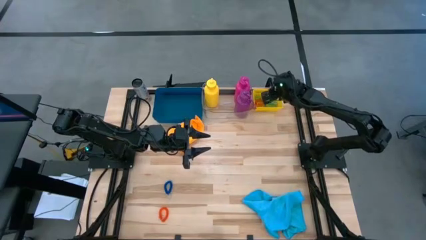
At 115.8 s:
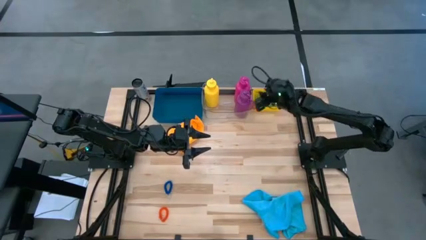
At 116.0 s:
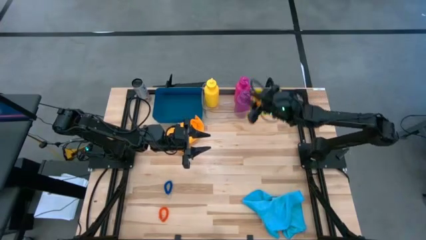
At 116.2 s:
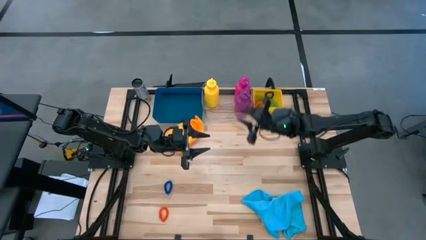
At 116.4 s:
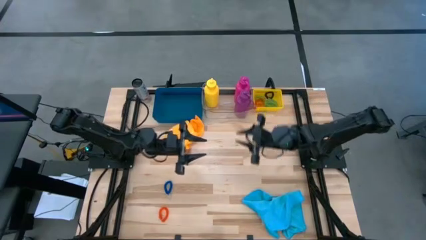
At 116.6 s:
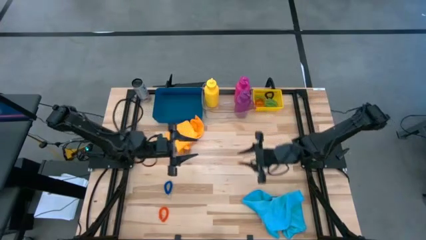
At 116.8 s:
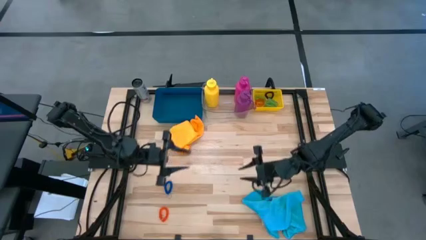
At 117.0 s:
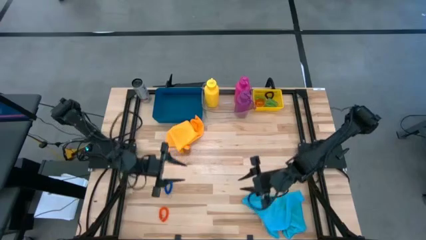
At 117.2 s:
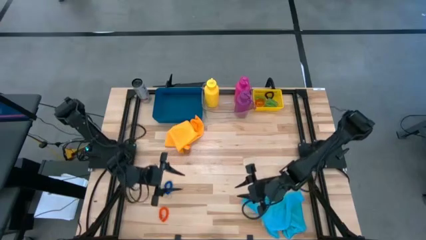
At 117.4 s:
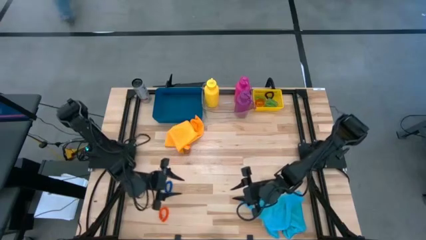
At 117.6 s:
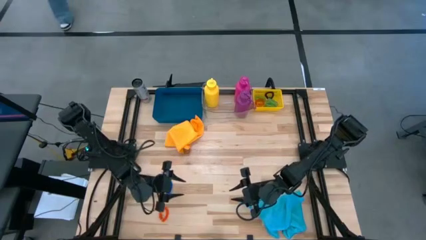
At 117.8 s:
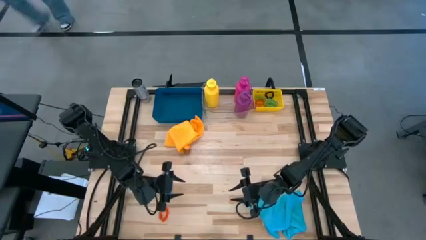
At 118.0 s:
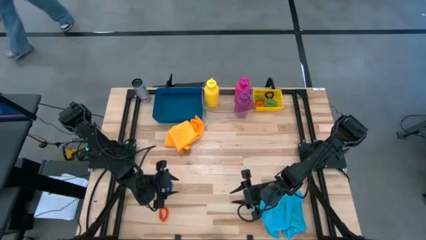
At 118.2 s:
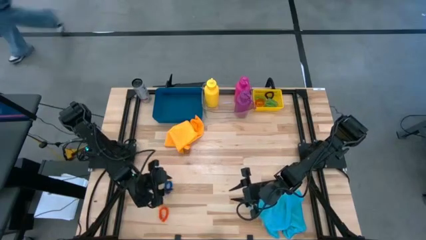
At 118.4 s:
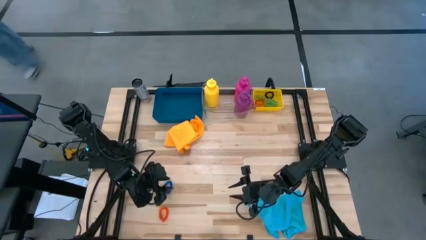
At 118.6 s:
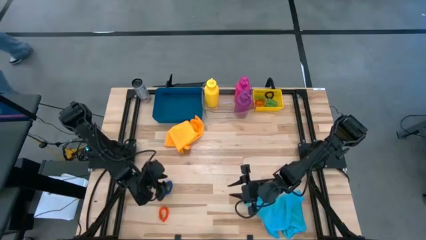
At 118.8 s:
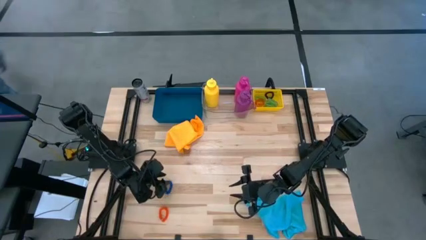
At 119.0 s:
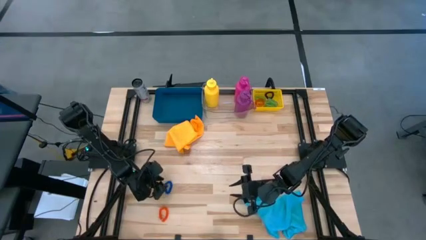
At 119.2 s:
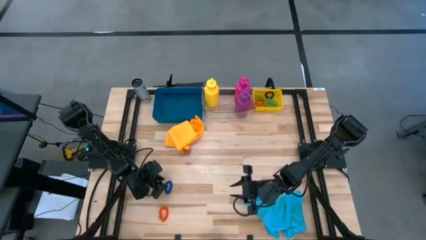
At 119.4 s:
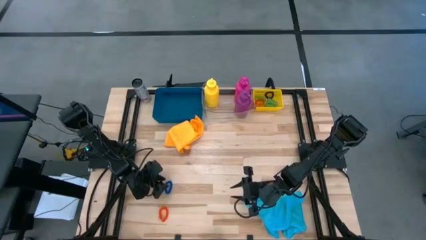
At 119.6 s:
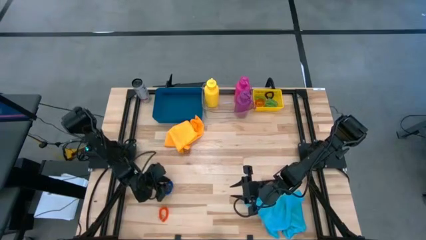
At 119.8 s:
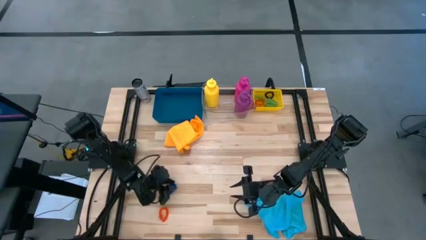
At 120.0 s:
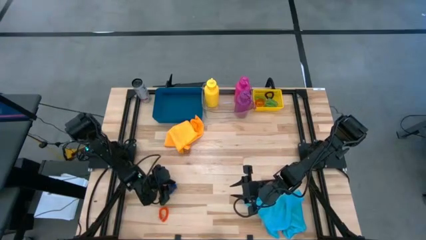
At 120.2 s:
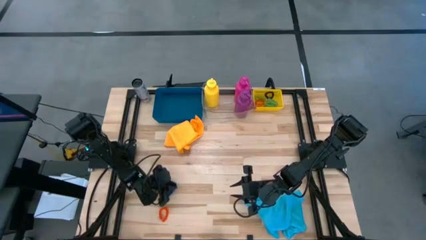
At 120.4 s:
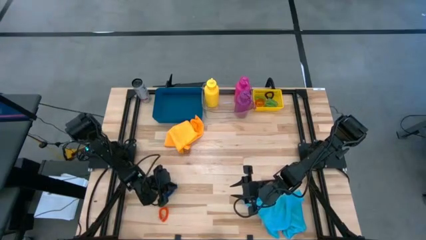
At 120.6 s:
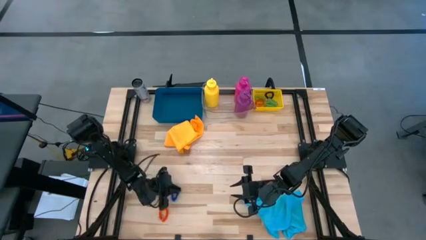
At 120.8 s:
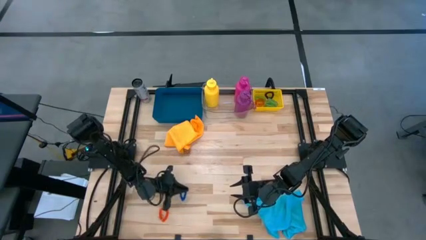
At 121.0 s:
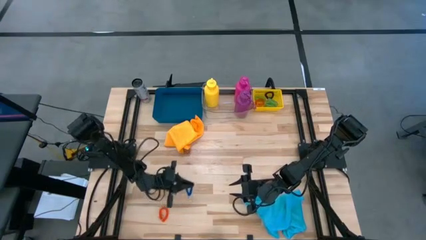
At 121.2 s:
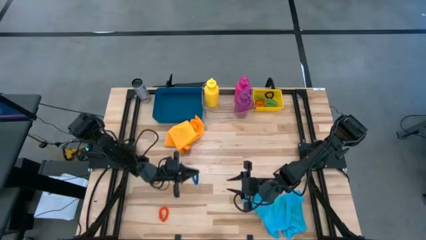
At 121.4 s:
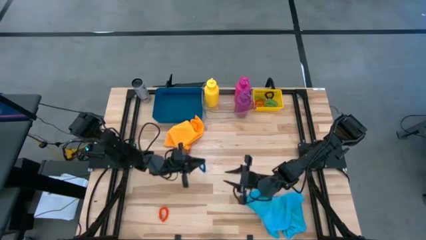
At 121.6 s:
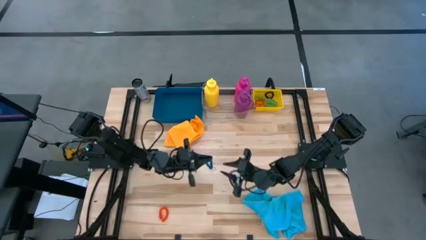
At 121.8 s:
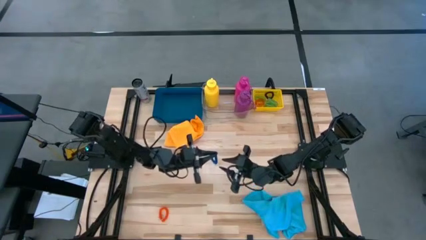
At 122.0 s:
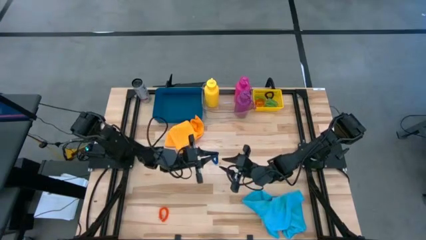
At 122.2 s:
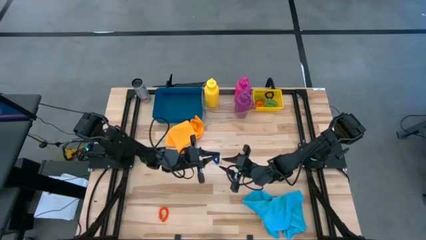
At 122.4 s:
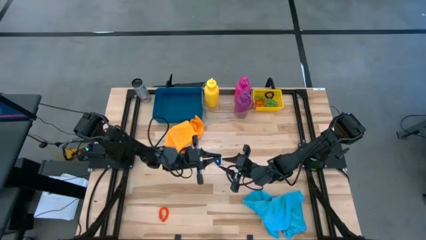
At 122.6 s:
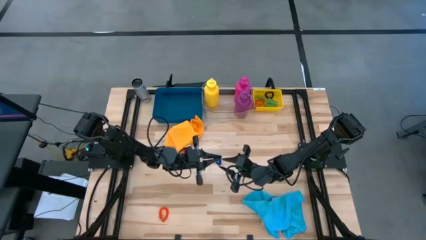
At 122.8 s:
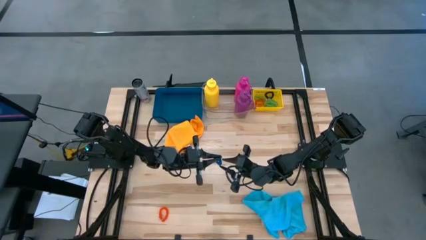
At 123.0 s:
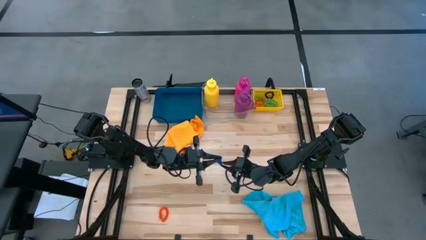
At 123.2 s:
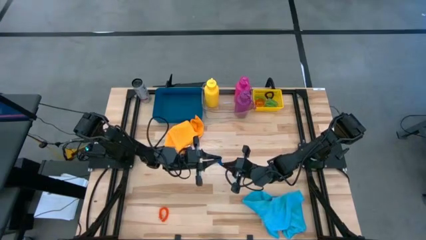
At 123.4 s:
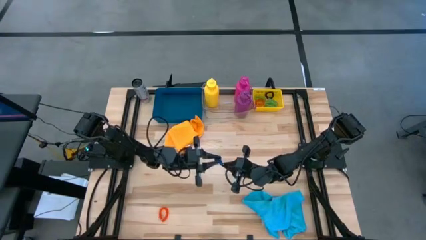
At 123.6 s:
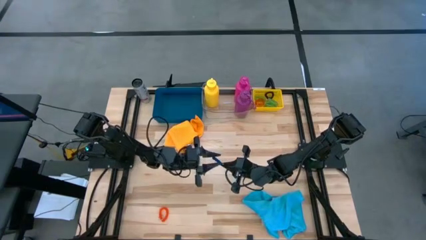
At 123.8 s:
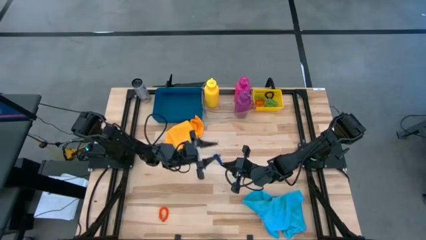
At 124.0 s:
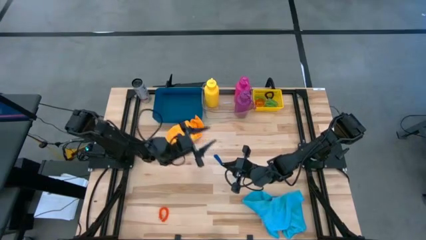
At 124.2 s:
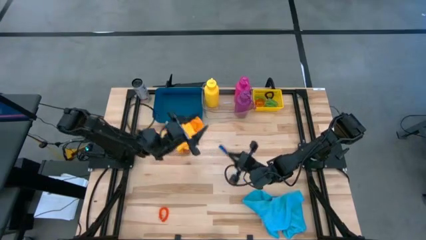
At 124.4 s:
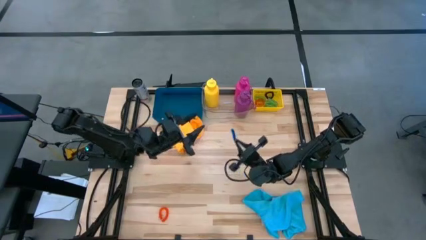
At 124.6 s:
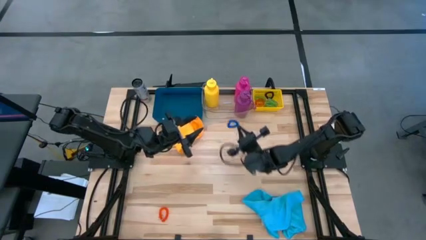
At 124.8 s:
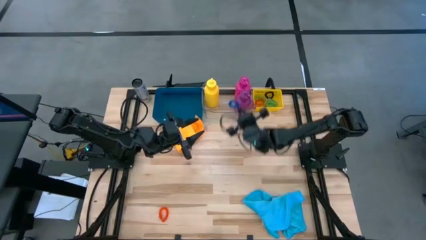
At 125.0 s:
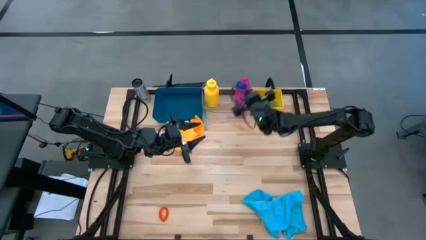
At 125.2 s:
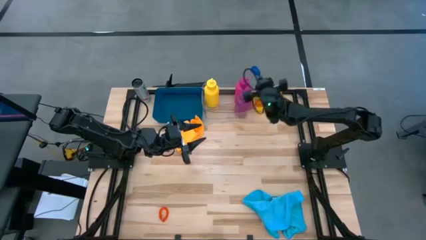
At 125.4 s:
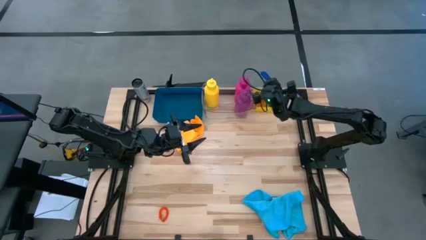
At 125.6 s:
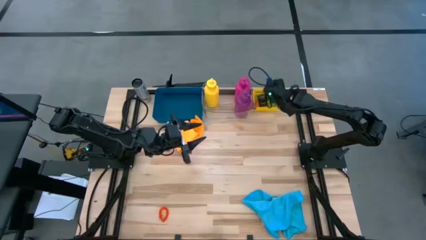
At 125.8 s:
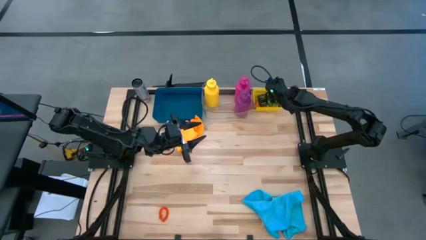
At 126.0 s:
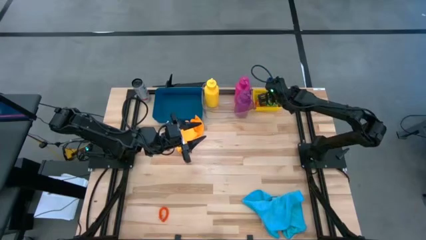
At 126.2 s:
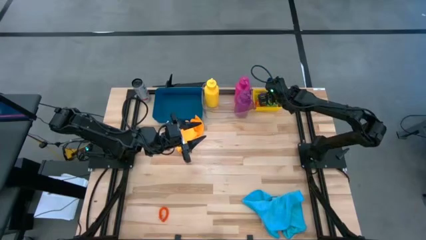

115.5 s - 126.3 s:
Task: Pick & Place Sports Items
Put the blue spring keychain into the yellow bin
